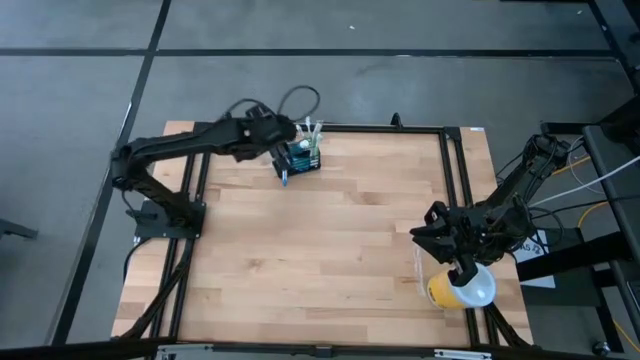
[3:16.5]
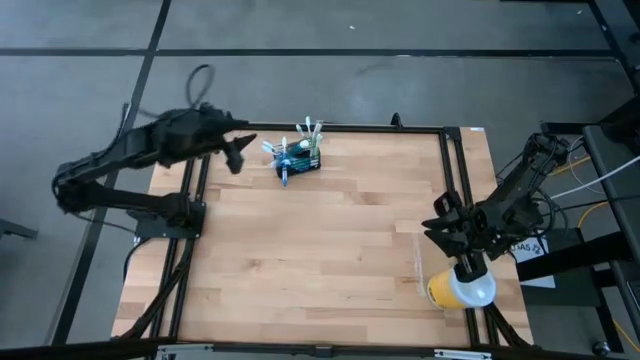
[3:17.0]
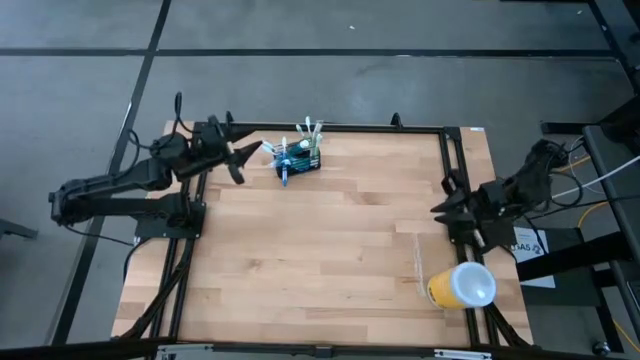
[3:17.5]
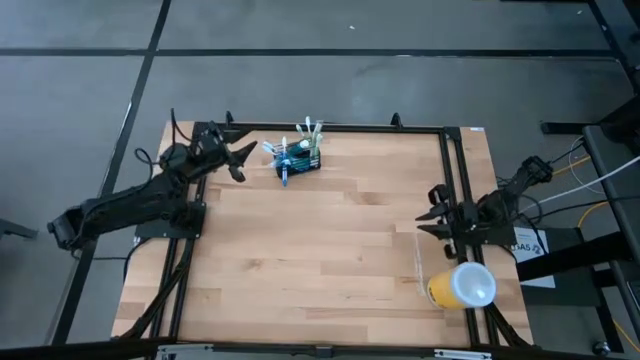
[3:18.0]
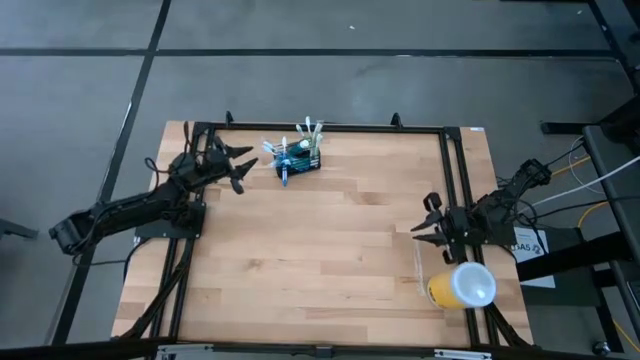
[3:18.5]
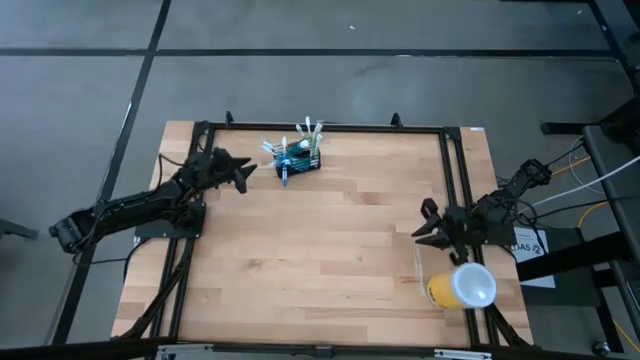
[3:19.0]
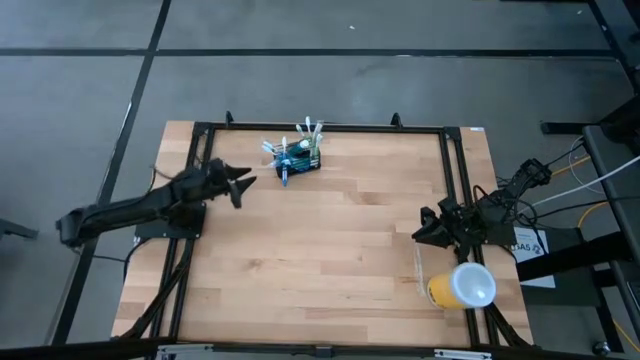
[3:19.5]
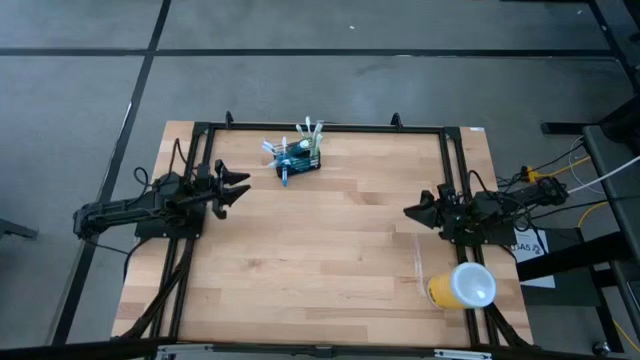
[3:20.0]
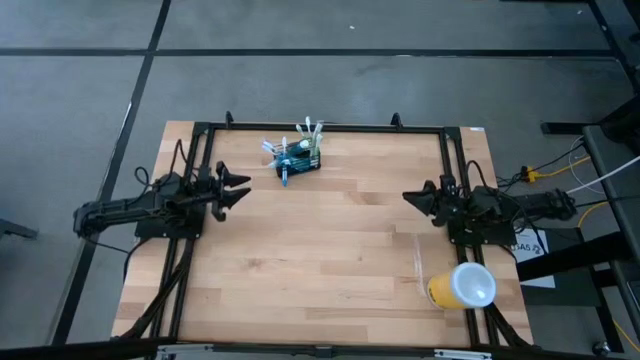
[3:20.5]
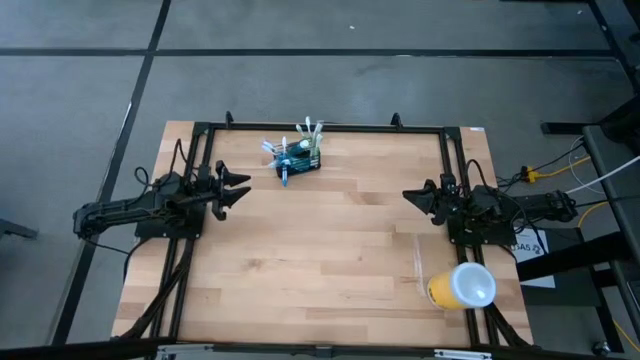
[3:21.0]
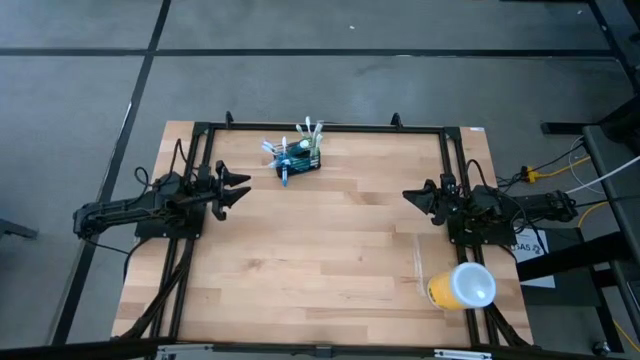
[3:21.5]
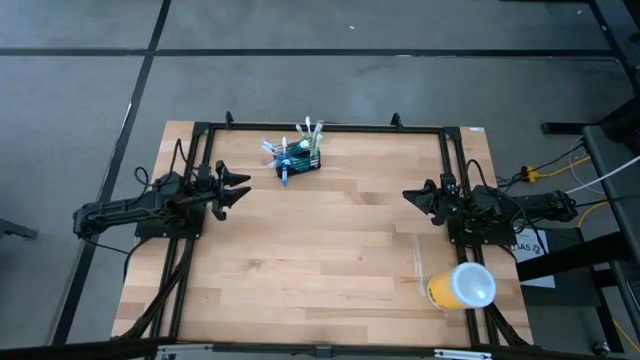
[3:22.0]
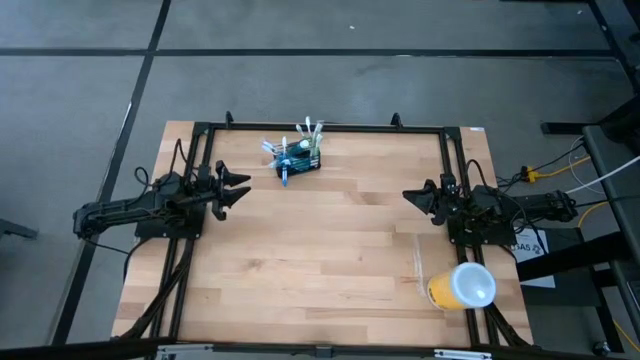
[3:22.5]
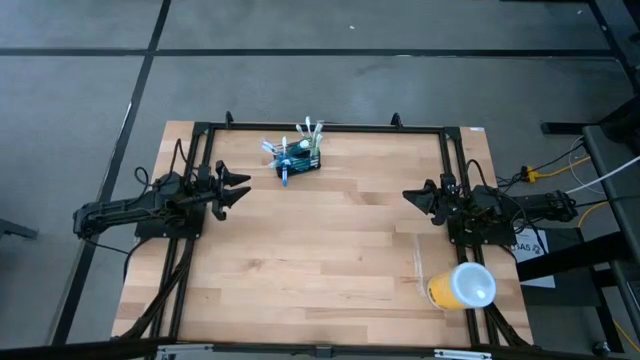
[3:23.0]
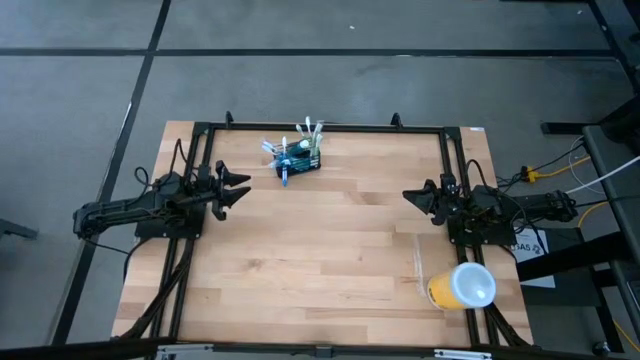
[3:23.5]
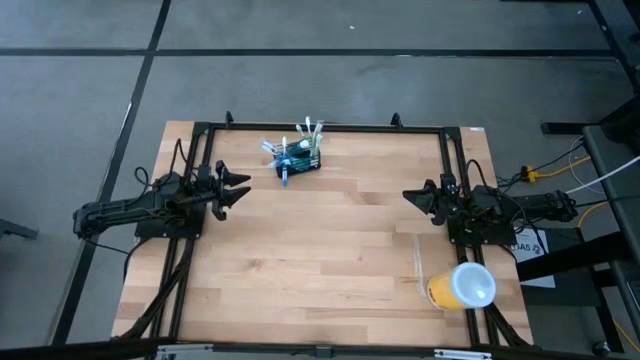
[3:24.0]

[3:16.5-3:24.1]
Task: Pick & Place toothbrushing station
Return to Home Position

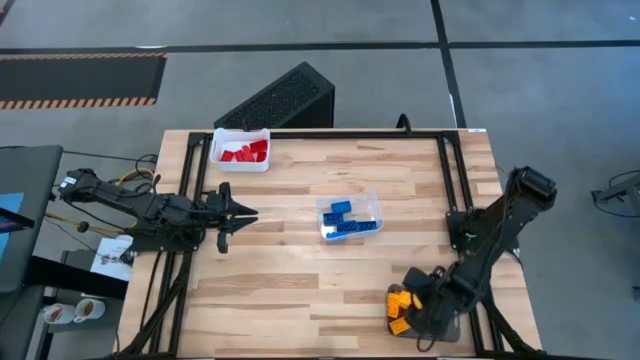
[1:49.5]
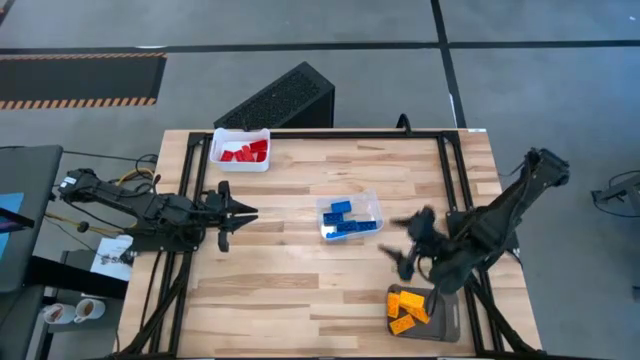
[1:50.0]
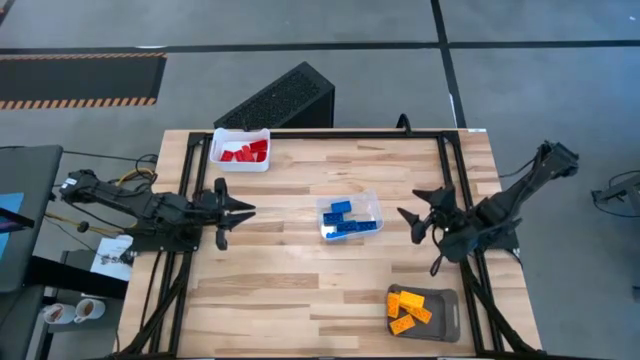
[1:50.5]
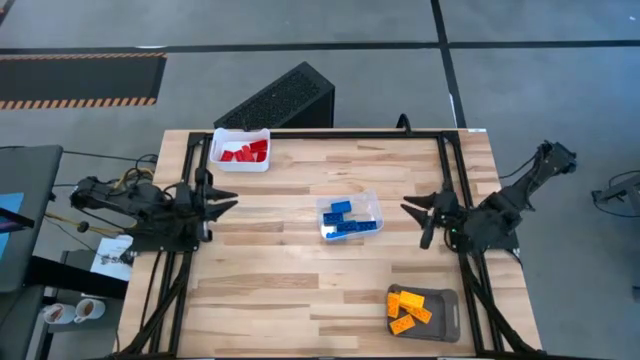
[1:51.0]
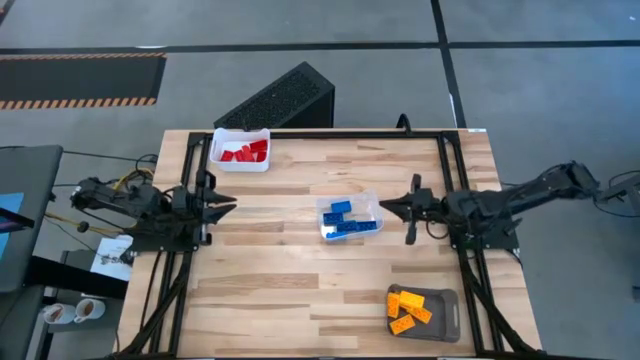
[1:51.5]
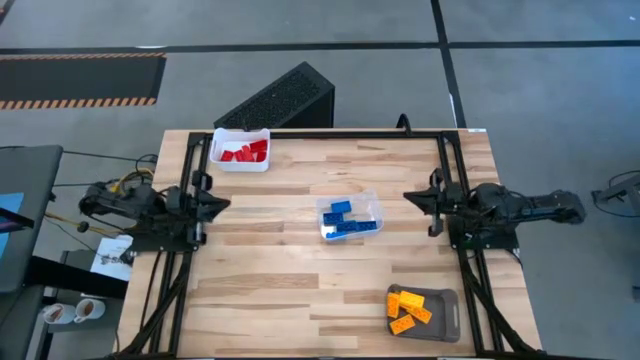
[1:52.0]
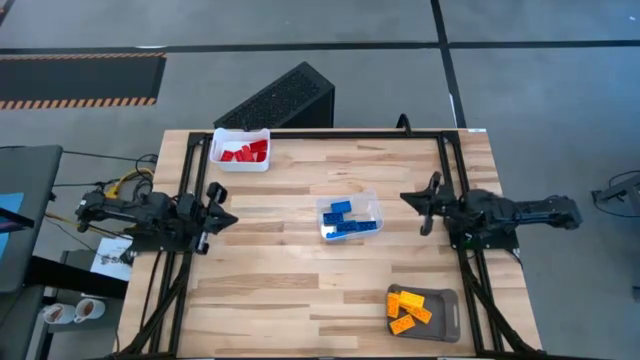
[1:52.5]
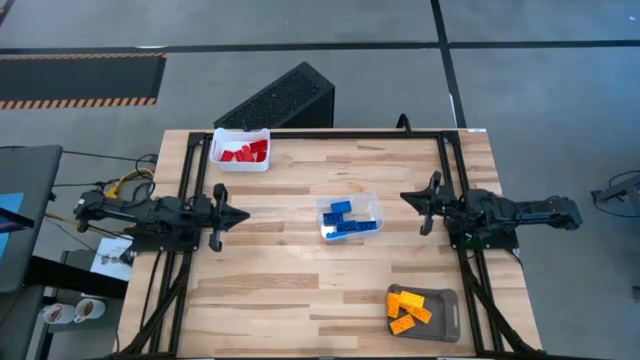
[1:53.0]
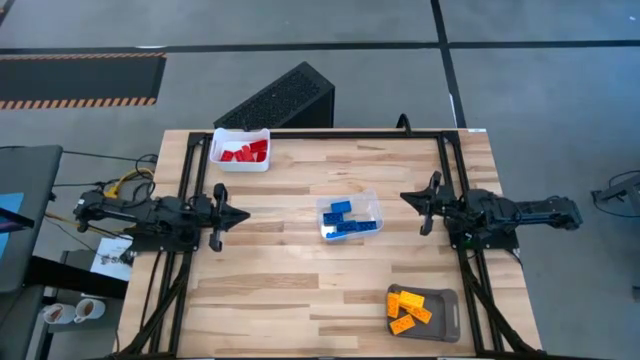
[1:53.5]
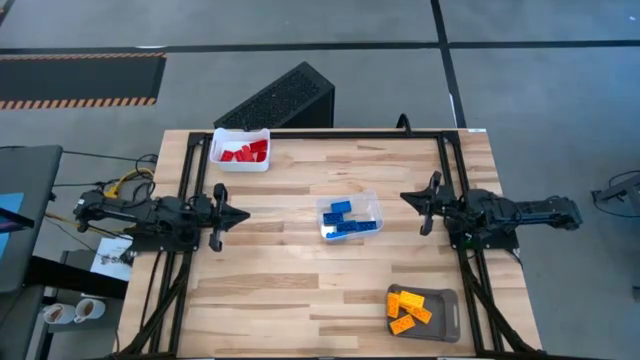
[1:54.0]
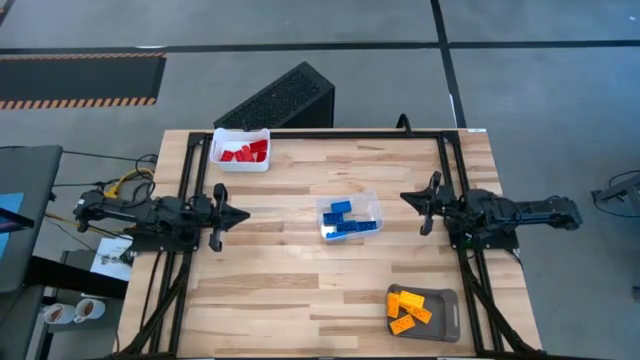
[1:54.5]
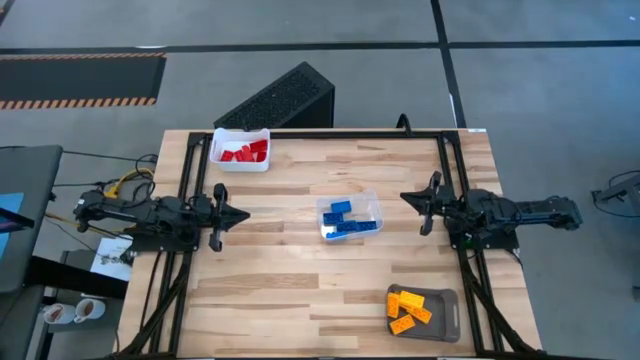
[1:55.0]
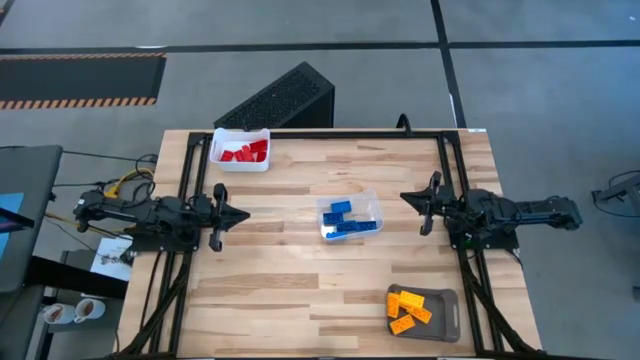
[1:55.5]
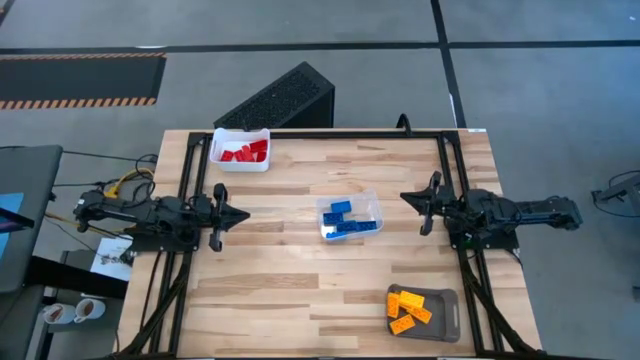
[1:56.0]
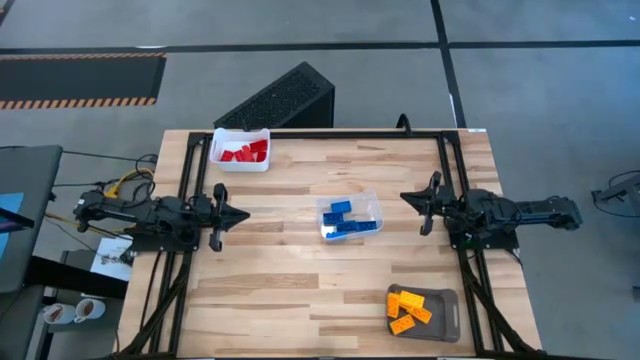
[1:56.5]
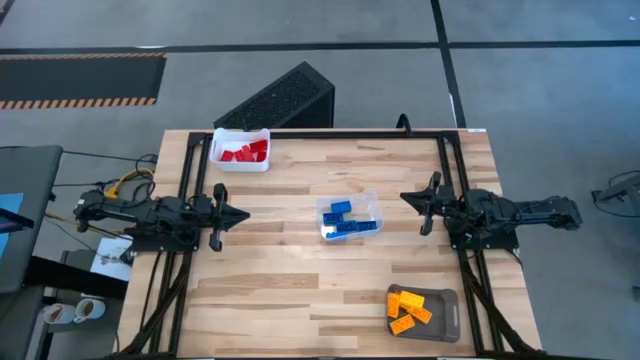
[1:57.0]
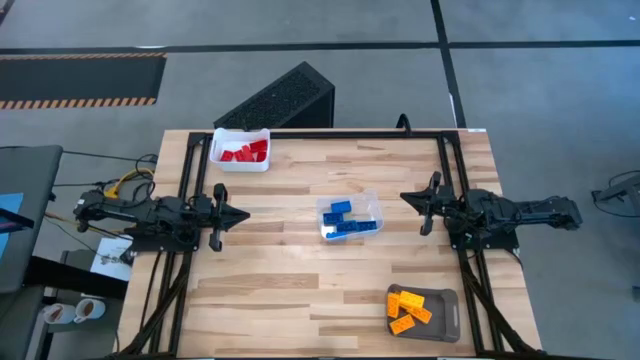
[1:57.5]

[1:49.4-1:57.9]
Task: Sort & place blocks by color
Return to Home Position
